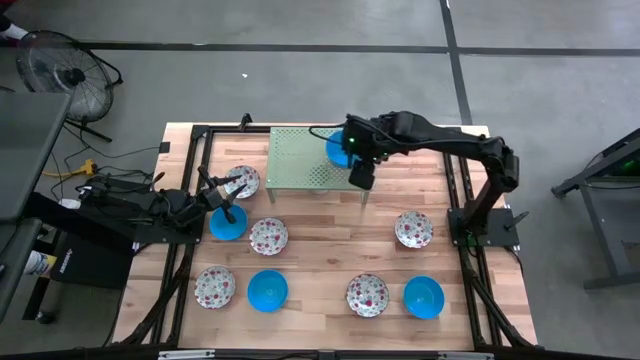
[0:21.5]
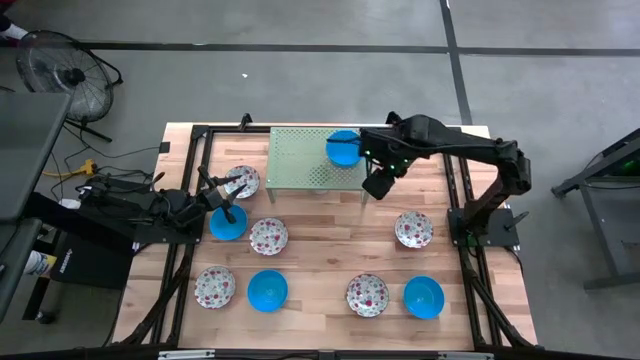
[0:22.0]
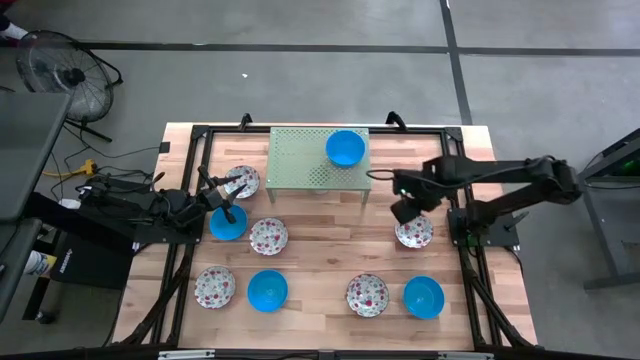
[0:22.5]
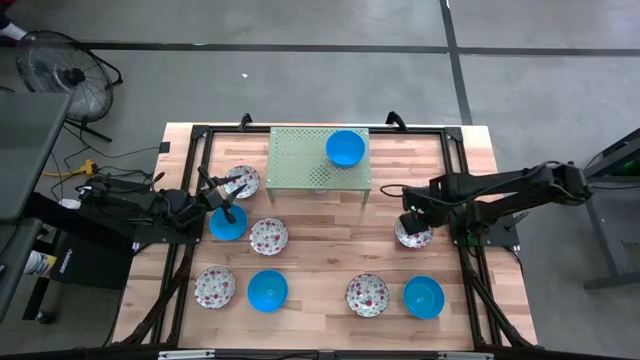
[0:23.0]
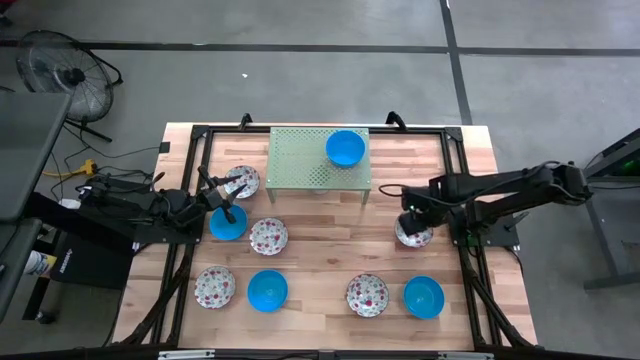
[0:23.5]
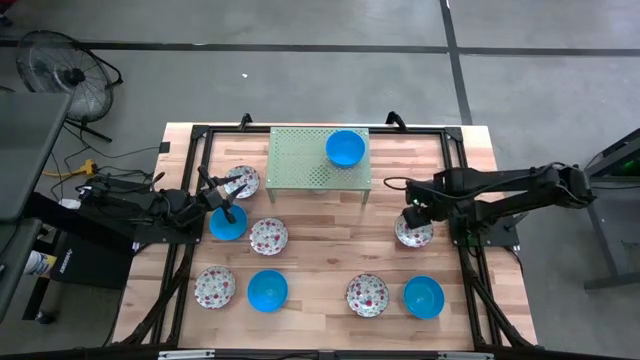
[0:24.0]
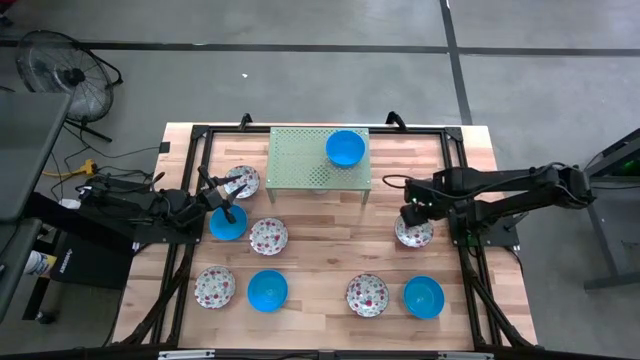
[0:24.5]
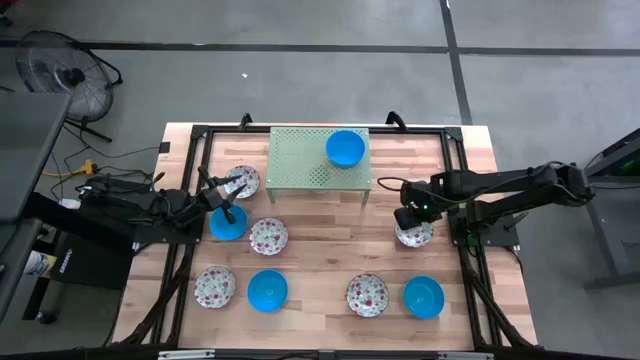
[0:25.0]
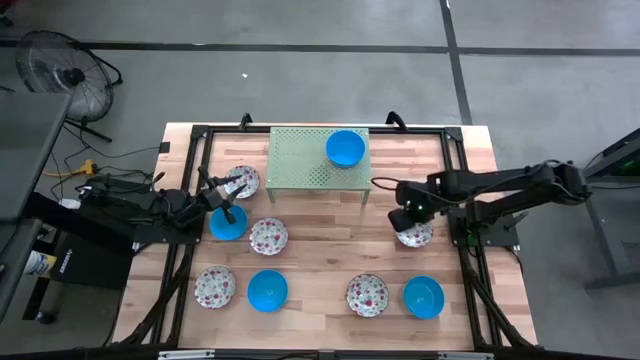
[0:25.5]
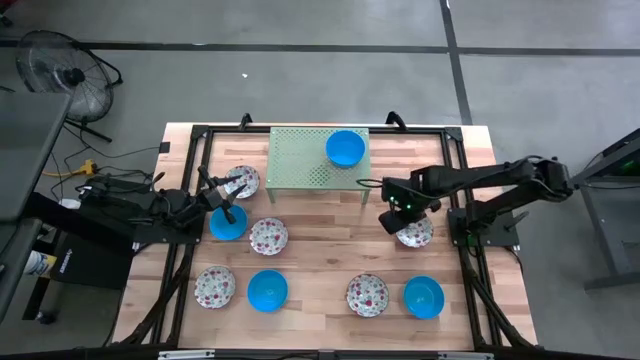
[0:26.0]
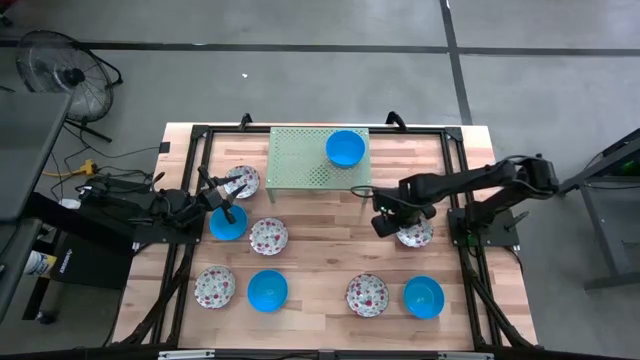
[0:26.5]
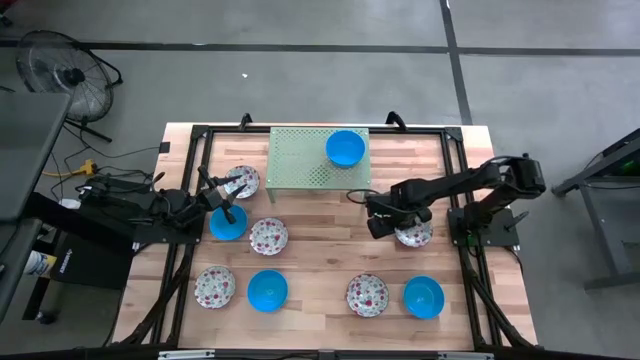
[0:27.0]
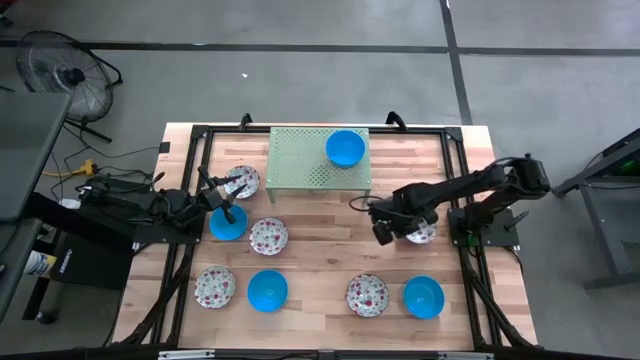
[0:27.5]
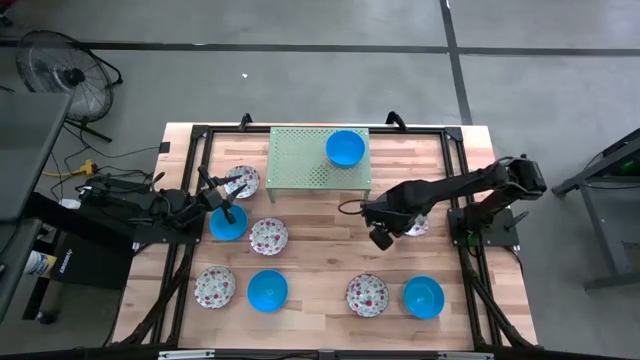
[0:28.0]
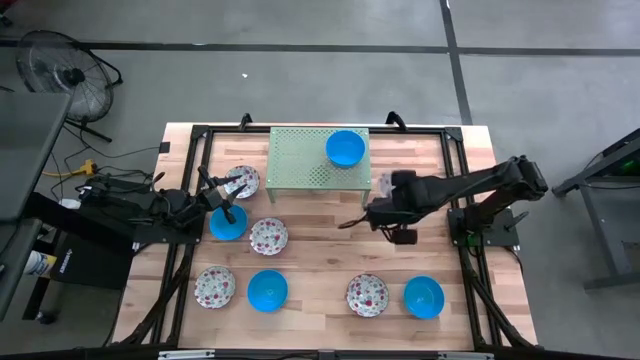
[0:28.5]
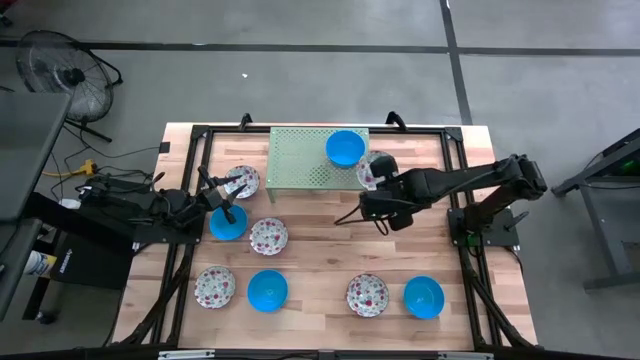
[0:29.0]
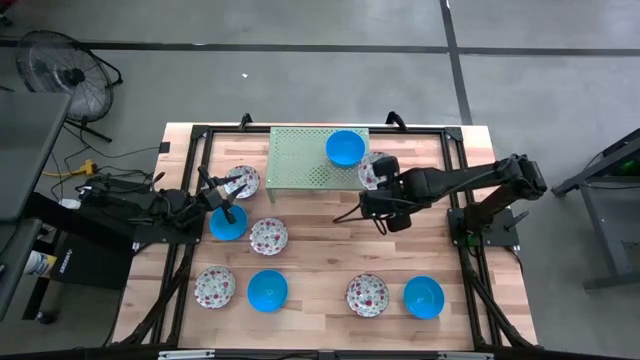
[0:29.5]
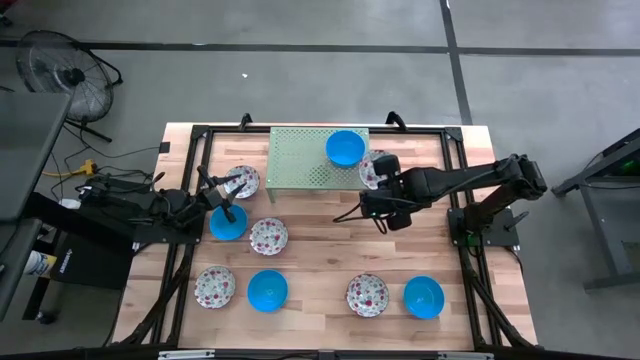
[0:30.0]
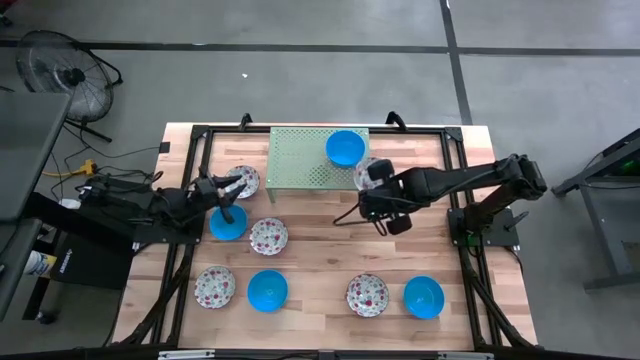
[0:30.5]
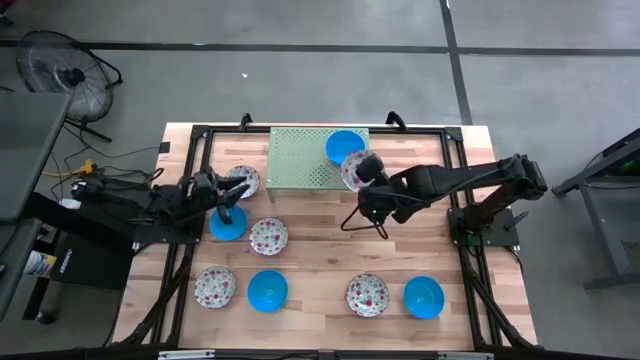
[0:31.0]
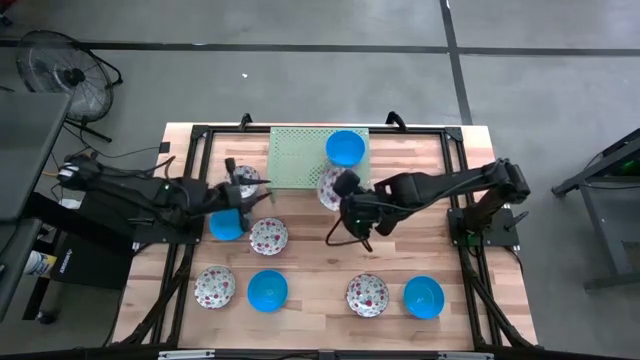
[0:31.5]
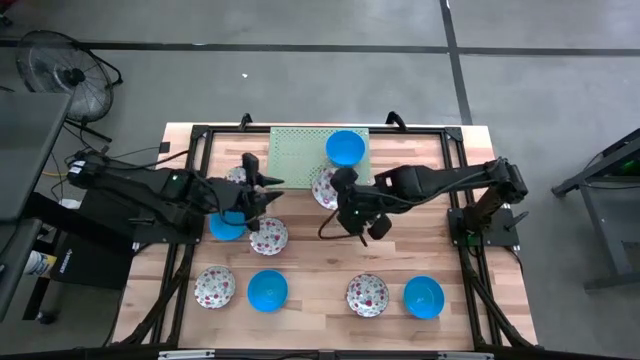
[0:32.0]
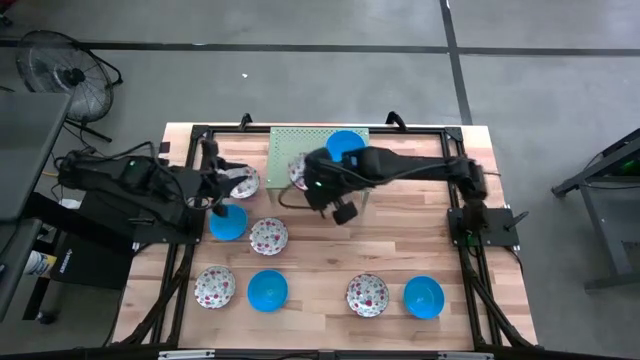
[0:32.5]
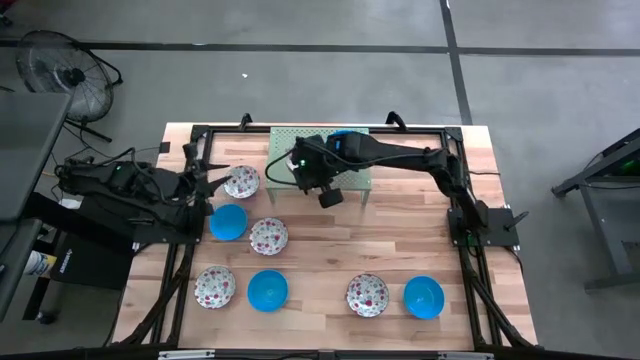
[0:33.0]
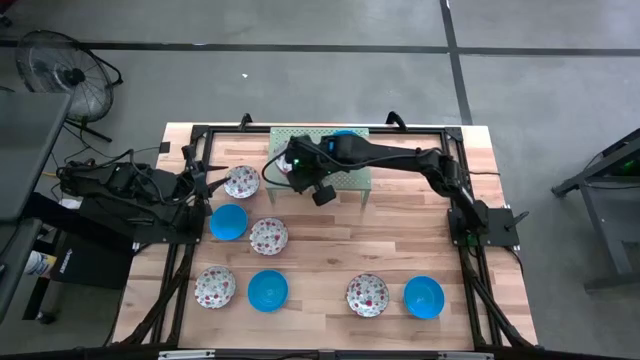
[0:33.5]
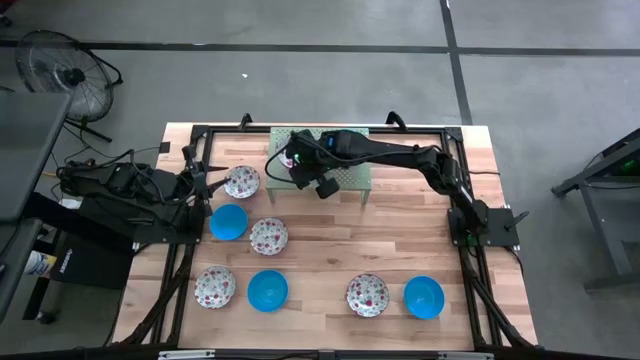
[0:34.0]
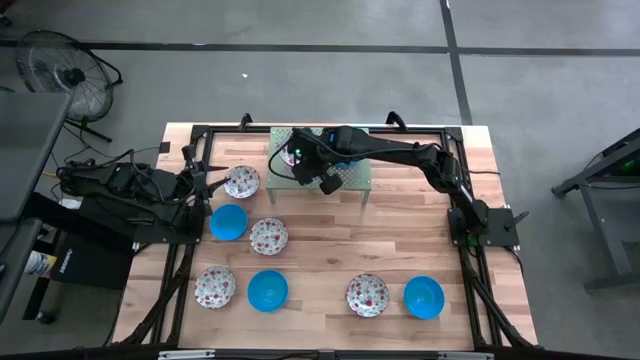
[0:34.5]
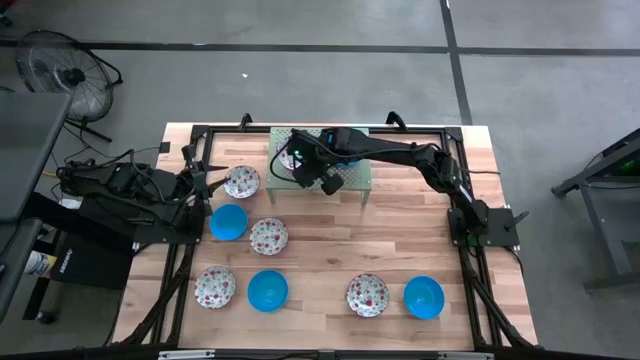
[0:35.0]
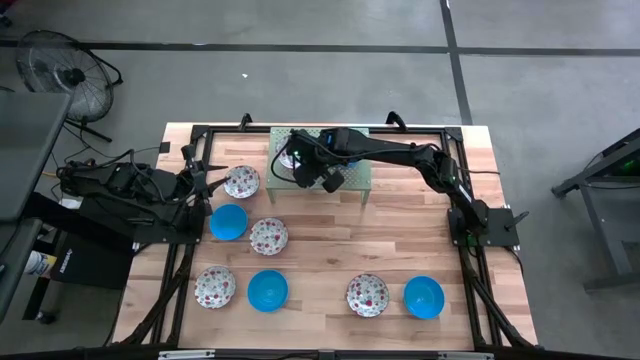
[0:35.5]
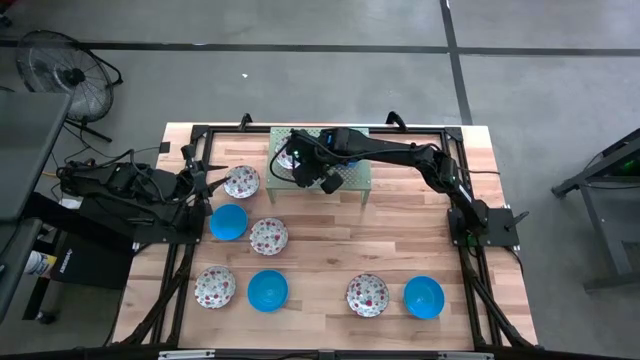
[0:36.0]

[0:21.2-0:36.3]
Task: Pick & Place Mini bowls
Put the red patterned bowl on the shelf

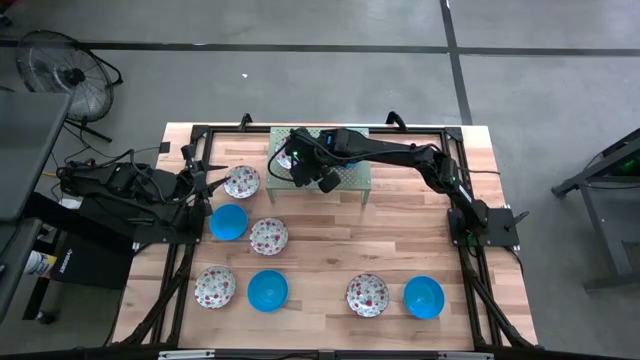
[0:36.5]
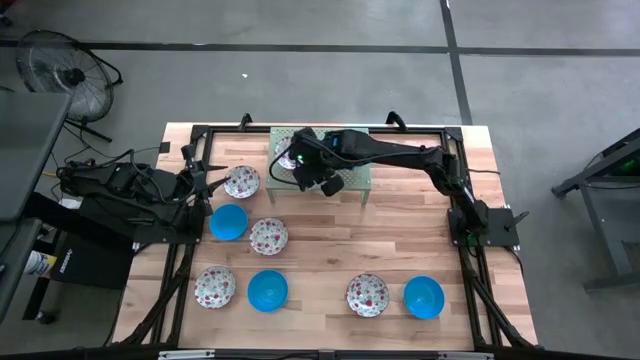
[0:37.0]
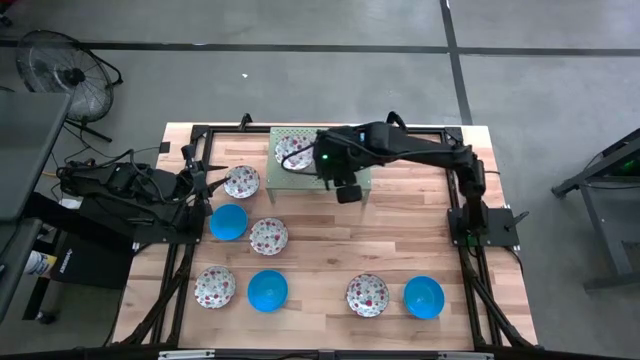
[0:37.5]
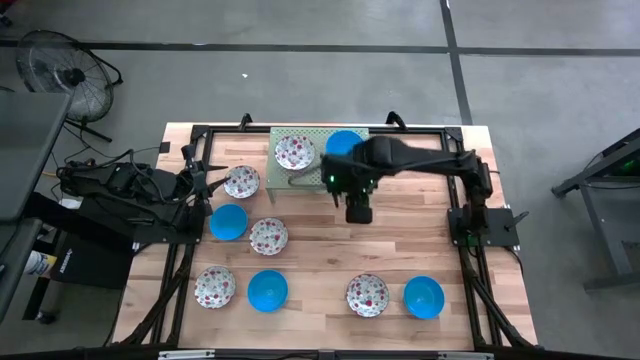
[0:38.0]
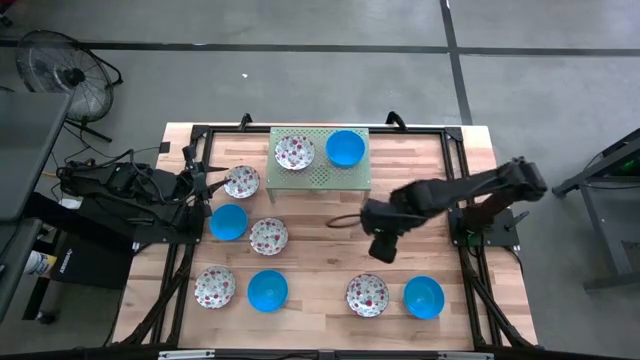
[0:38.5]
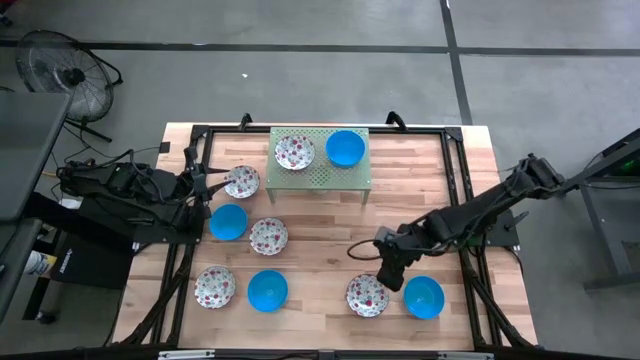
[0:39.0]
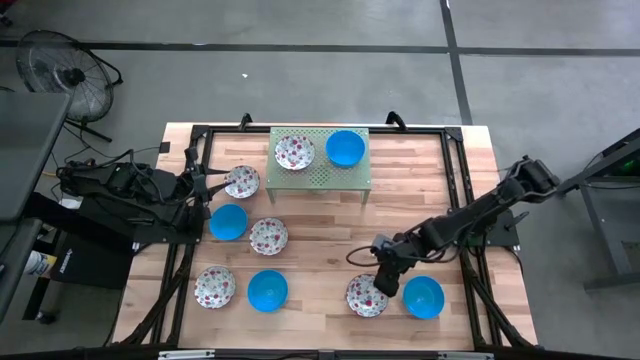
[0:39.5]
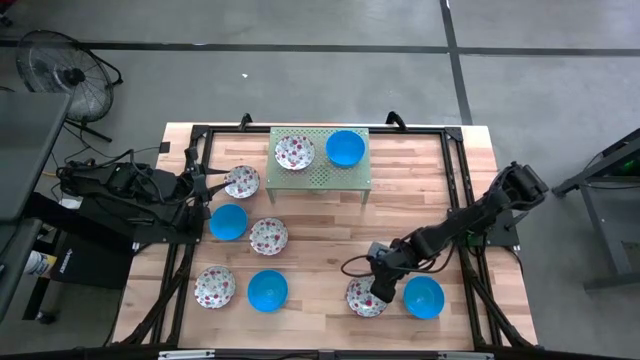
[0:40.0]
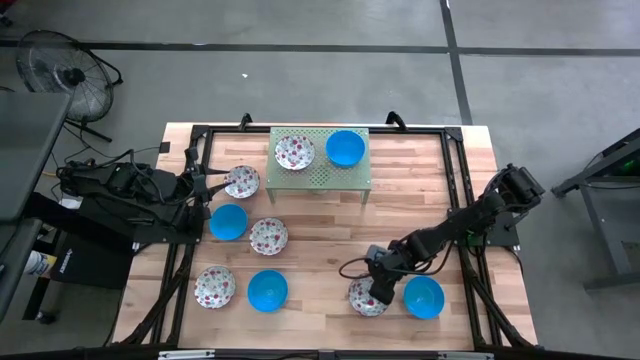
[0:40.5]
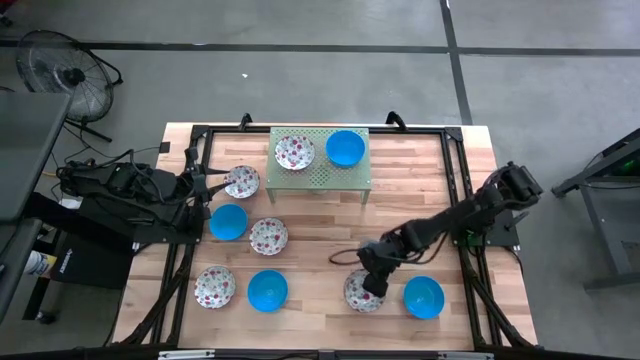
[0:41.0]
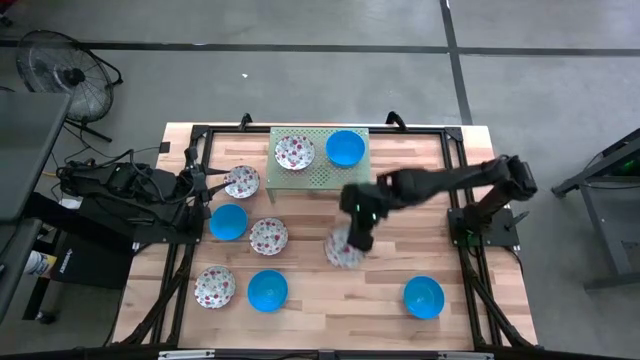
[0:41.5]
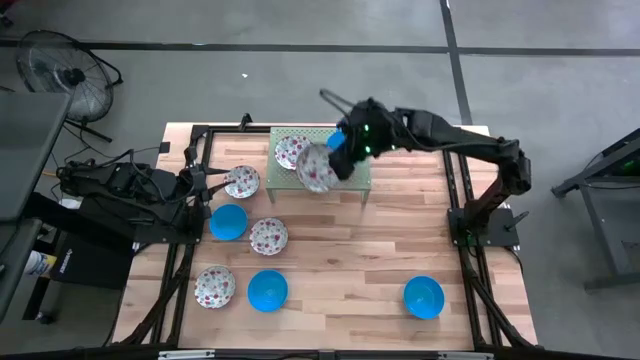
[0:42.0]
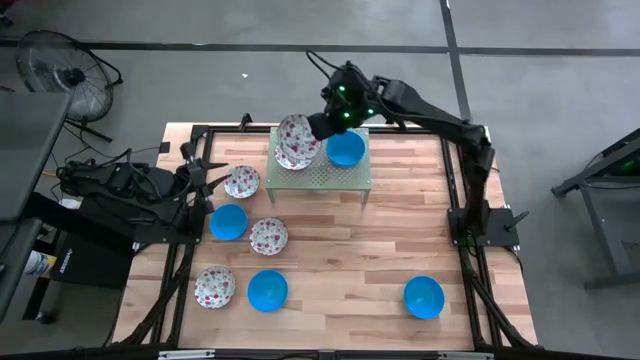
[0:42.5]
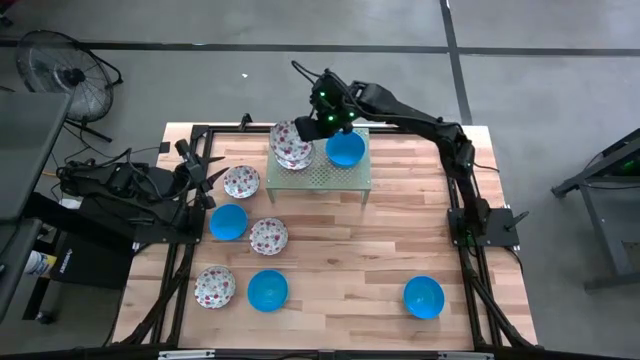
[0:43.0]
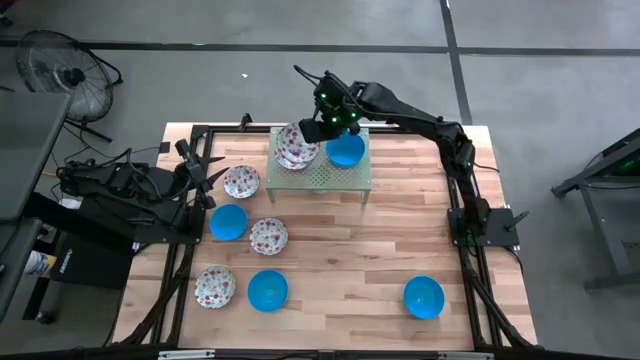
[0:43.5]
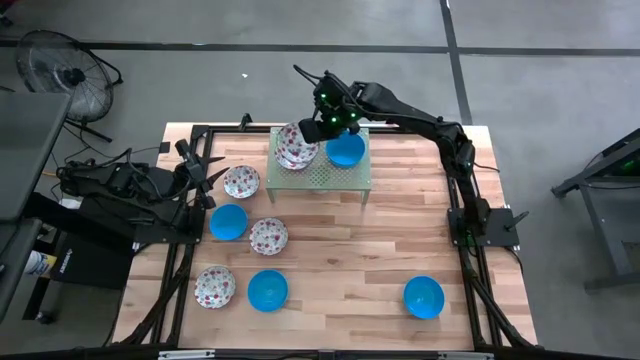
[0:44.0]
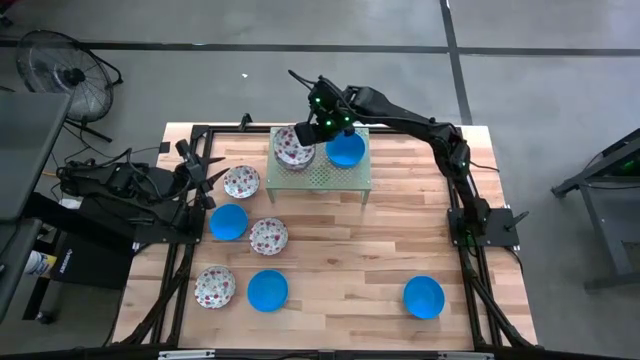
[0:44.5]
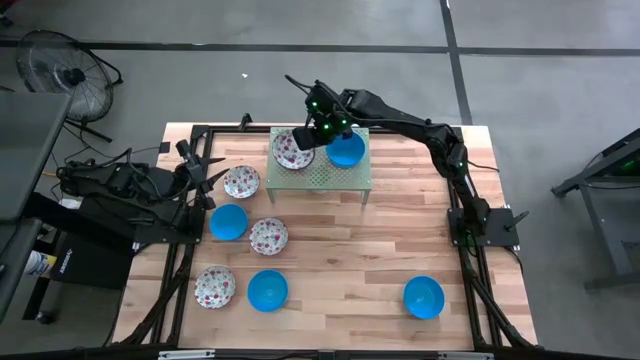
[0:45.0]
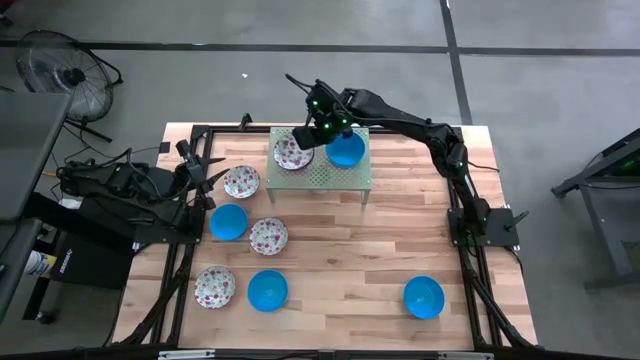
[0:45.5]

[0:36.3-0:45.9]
Stack the red patterned bowl on the red patterned bowl on the shelf
